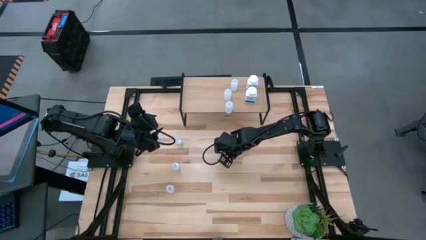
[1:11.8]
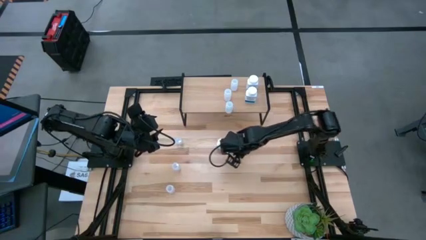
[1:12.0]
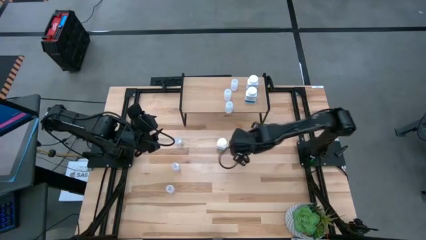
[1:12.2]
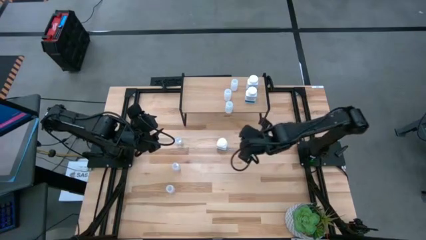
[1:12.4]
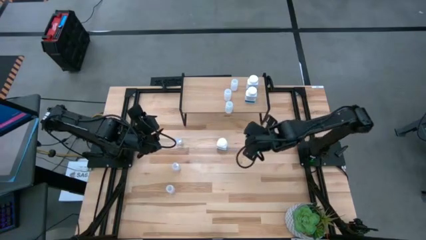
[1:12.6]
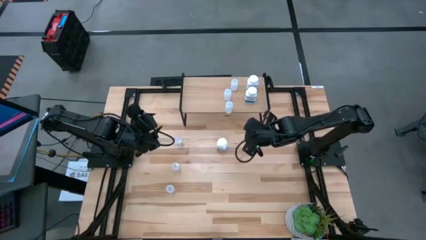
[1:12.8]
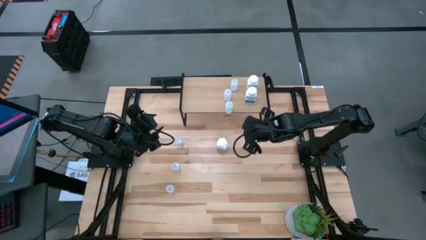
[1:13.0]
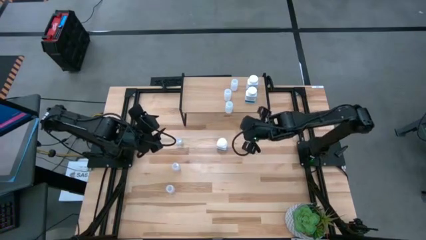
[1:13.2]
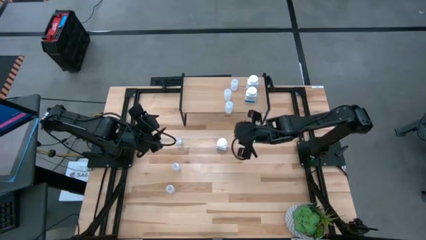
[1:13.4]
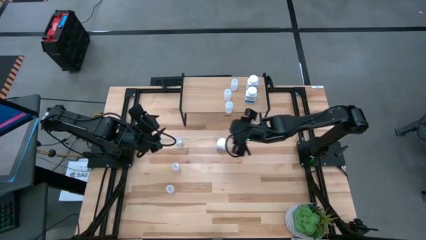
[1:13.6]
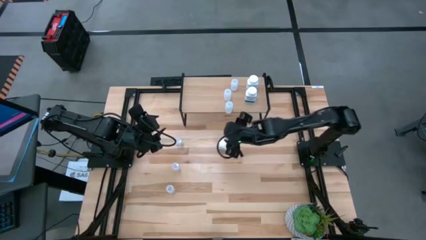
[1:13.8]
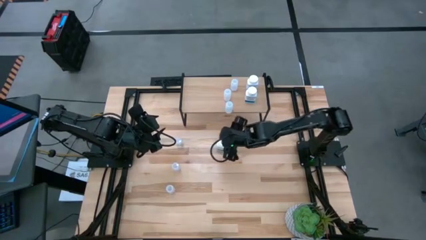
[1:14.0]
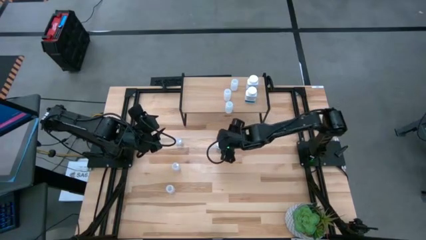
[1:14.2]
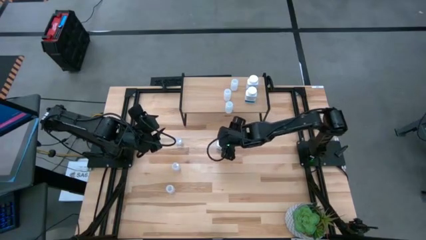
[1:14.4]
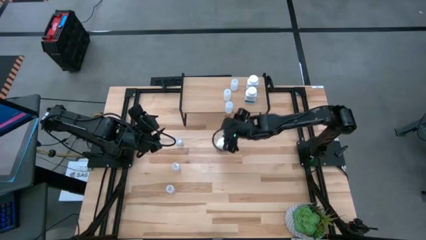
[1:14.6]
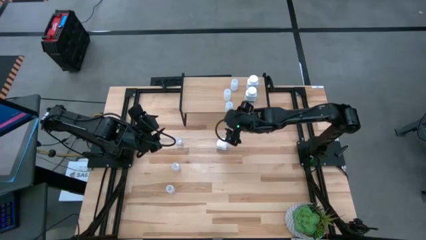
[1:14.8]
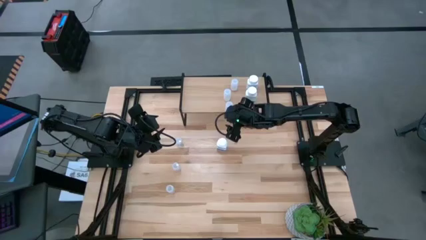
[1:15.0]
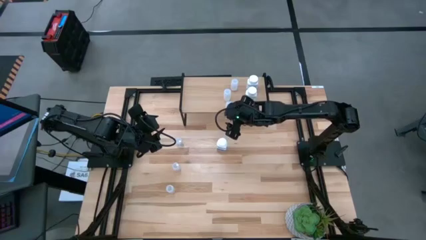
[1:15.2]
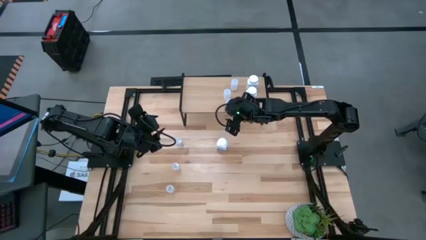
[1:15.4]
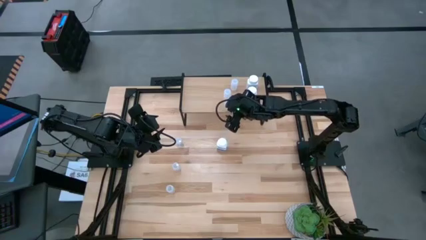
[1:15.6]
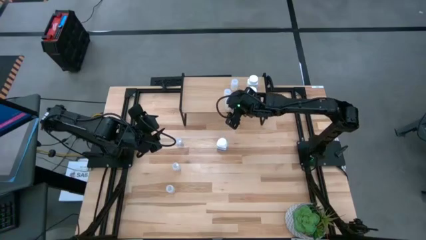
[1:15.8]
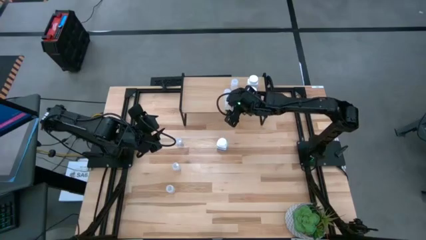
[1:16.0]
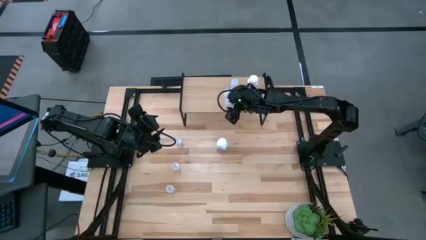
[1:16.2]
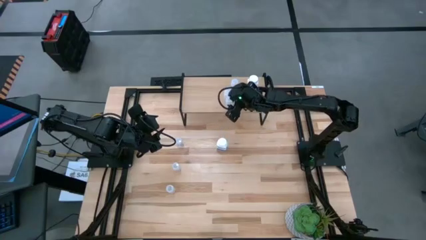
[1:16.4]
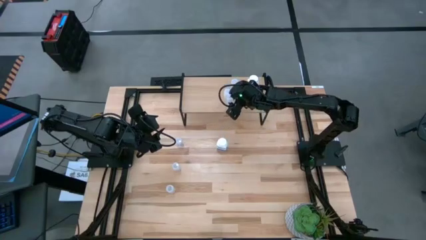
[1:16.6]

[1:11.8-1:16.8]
Task: Pick and place medicine bottles onto shelf by color
Adjust the small white pill bottle on the shelf

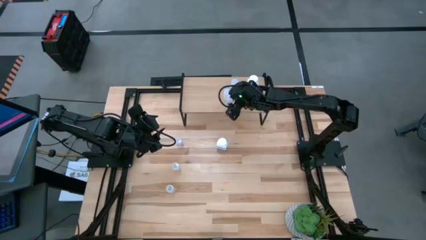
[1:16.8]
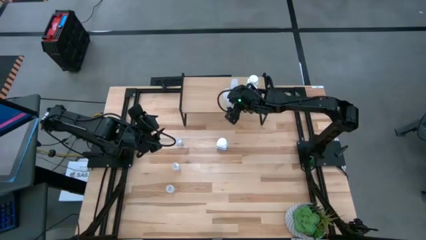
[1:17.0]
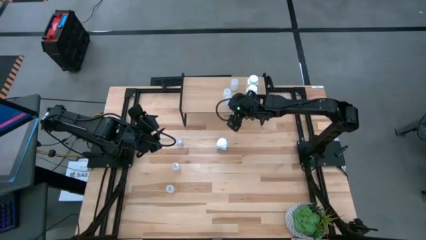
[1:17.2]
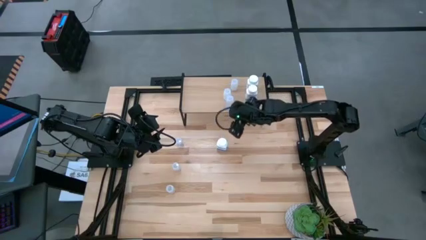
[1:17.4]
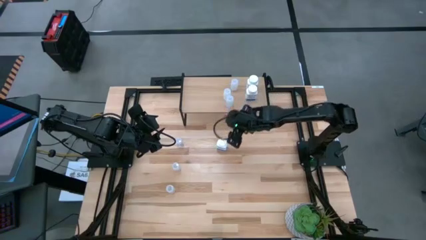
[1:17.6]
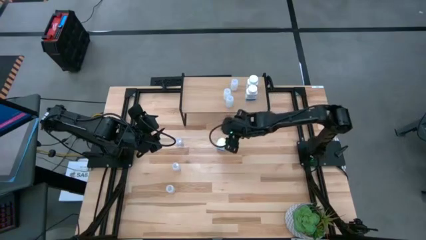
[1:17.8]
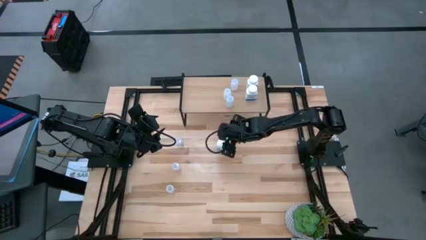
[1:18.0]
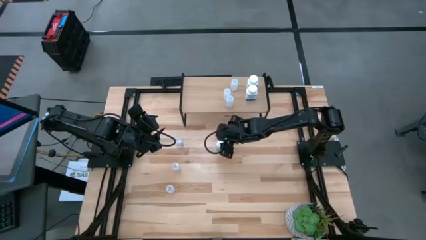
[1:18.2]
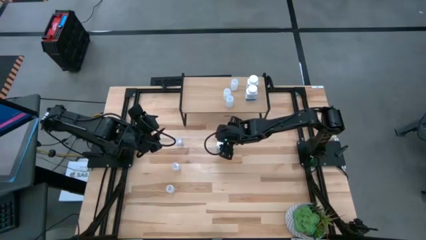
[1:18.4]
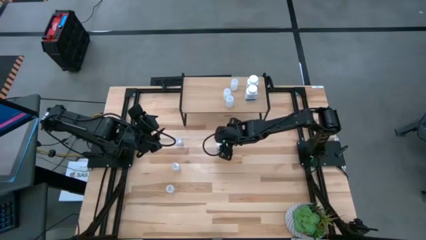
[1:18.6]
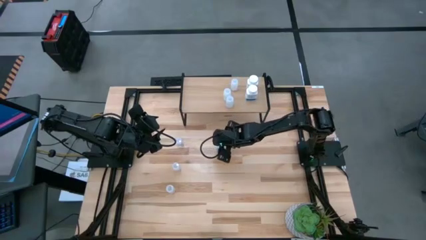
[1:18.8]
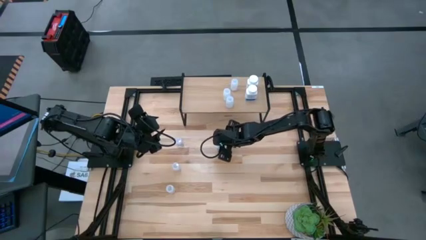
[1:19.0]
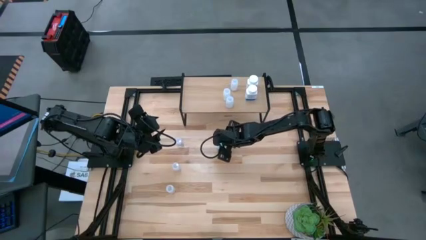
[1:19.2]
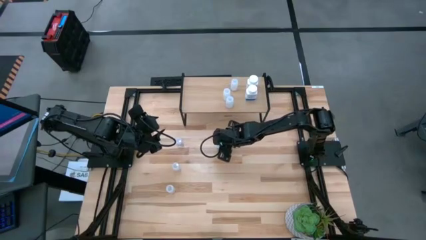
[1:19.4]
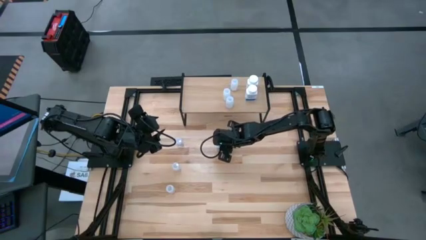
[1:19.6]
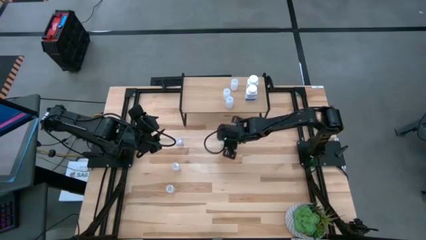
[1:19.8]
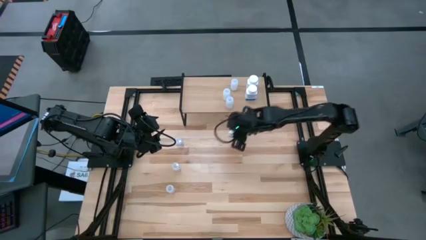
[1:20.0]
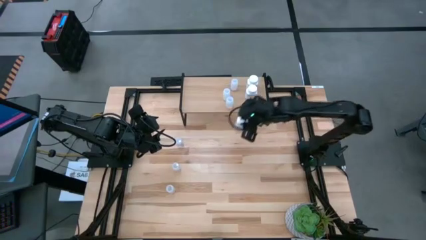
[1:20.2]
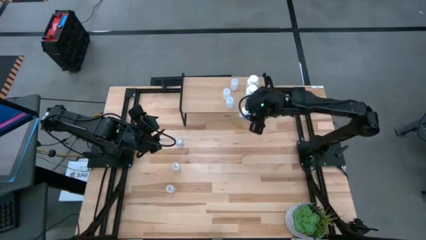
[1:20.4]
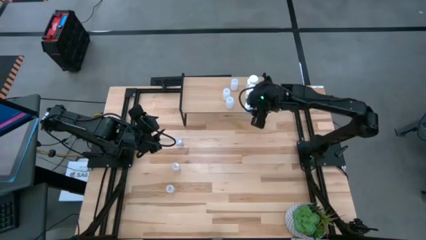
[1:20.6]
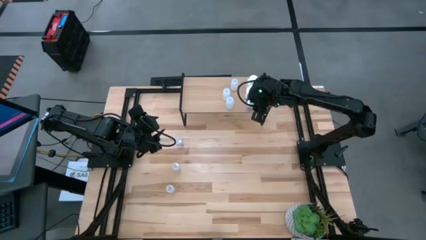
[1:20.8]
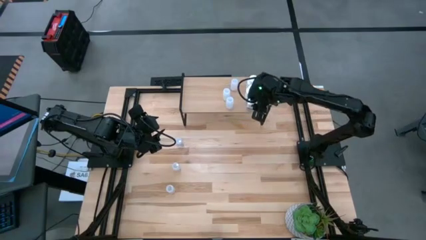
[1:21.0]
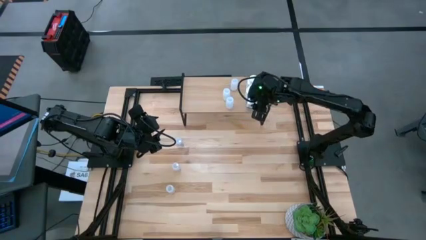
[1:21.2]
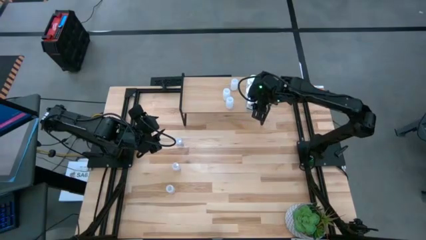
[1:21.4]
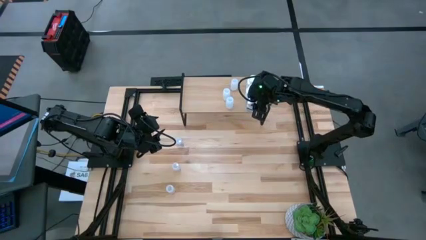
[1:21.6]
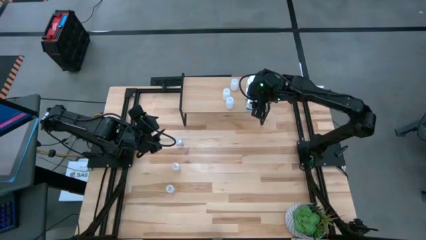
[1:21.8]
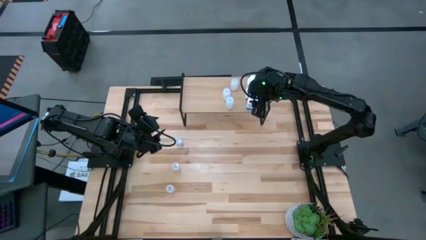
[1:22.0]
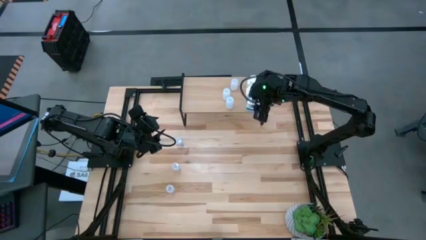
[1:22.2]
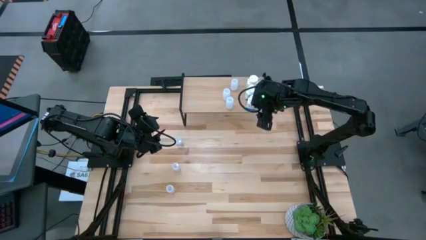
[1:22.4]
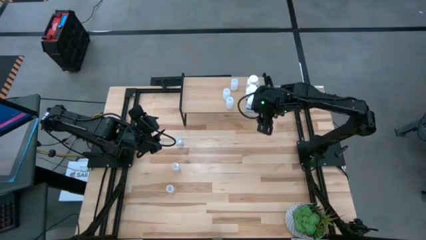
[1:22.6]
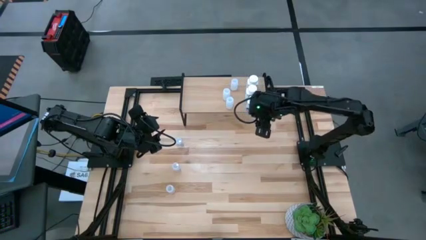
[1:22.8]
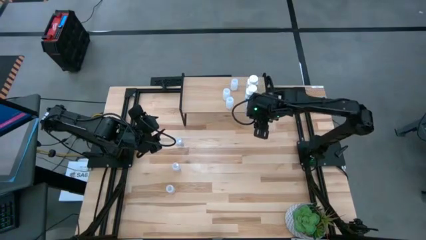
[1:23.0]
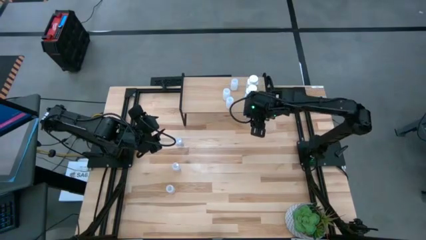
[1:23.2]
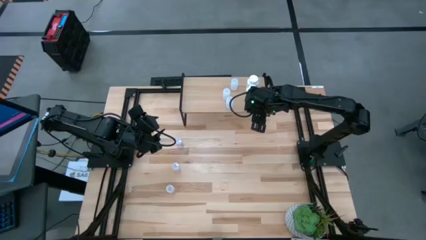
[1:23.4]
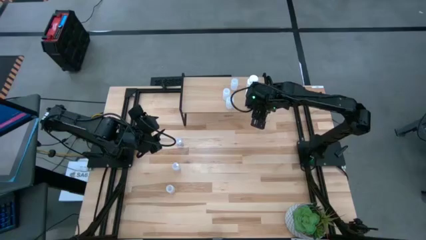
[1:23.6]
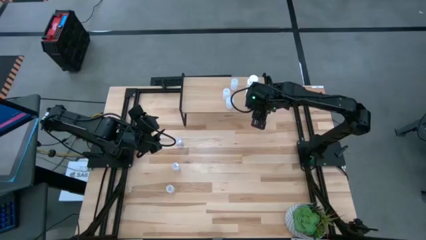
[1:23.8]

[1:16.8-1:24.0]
Put the large white pill bottle on the shelf aligned with the other large pill bottles

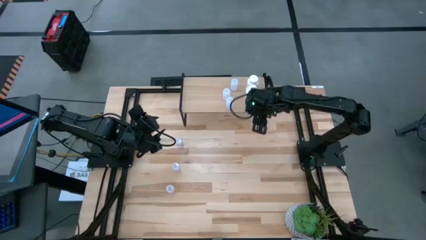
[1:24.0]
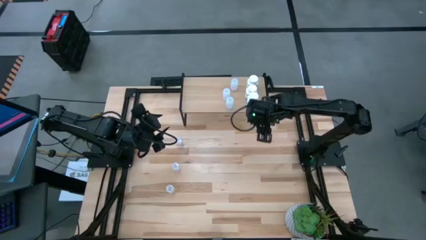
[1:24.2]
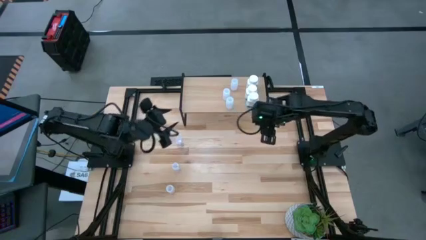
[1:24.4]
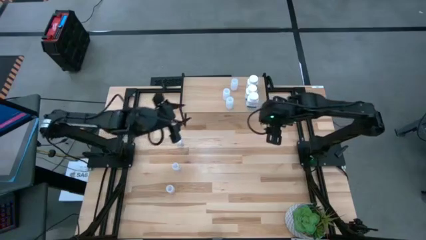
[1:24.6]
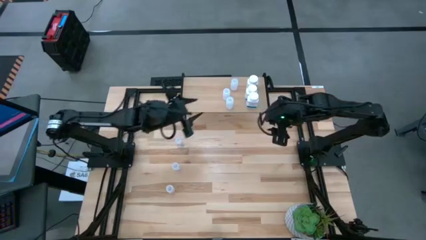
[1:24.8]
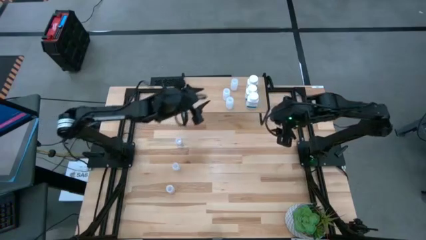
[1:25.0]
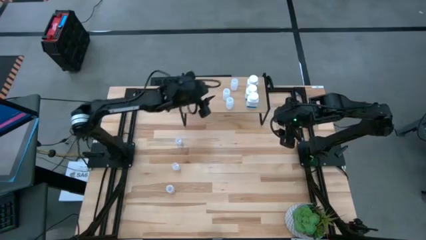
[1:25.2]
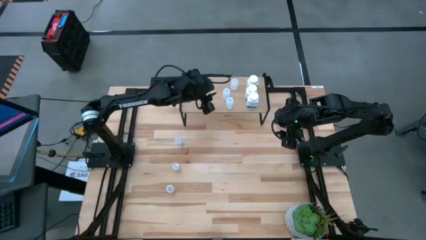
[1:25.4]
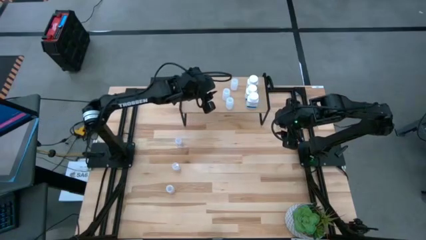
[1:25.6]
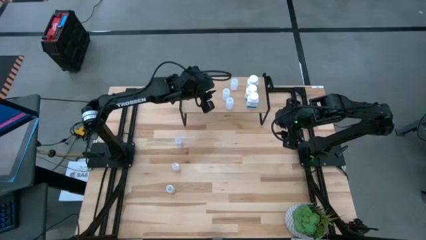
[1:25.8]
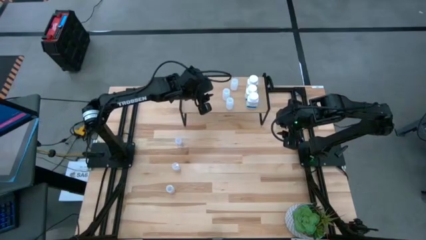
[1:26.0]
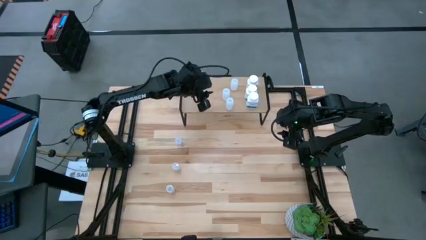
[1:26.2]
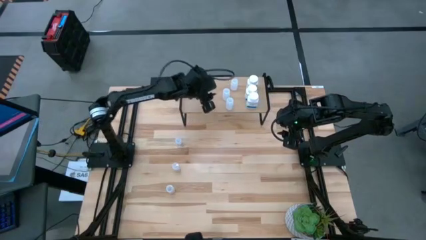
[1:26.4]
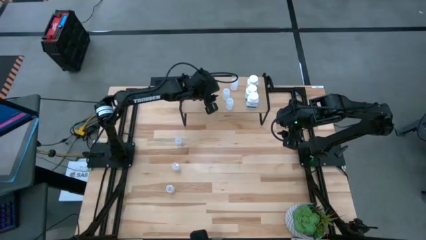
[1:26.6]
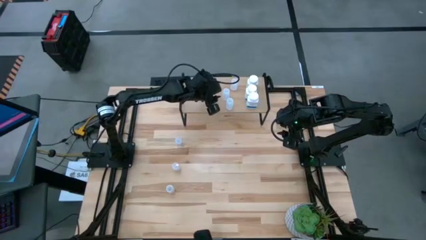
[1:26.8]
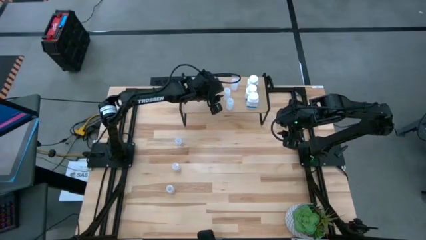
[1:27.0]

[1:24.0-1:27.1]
Adjust the center small white pill bottle on the shelf
